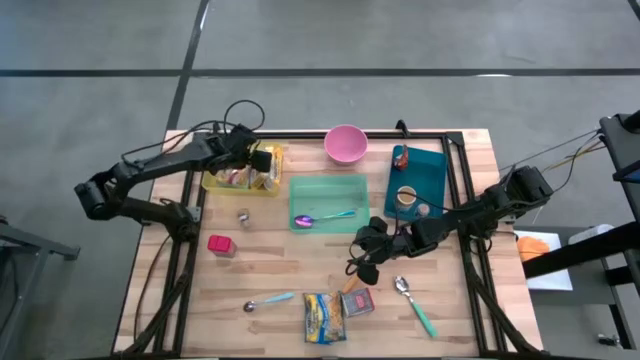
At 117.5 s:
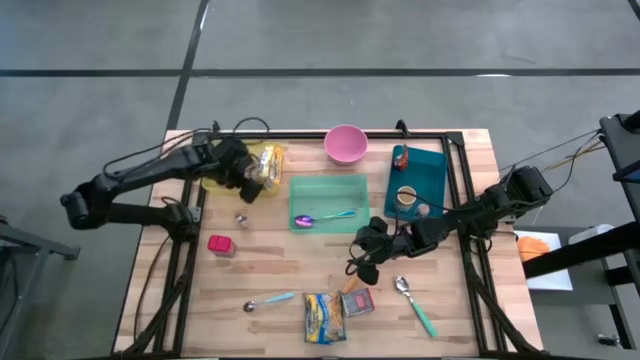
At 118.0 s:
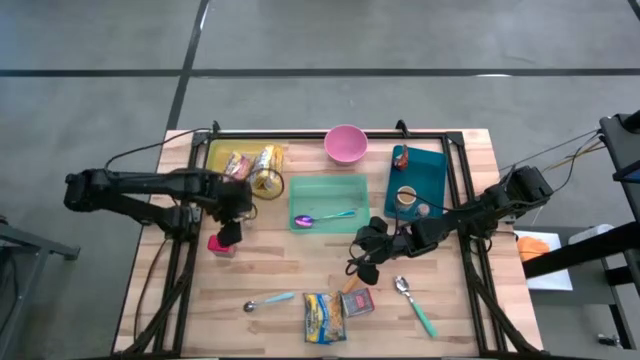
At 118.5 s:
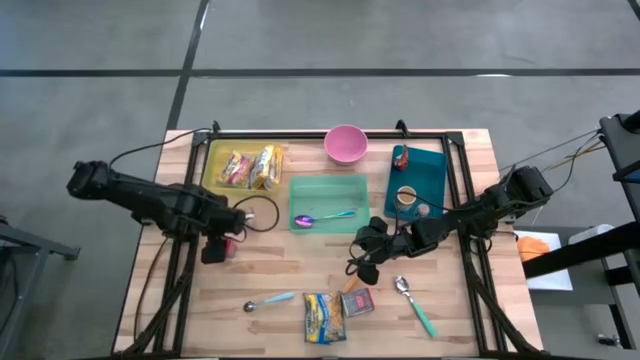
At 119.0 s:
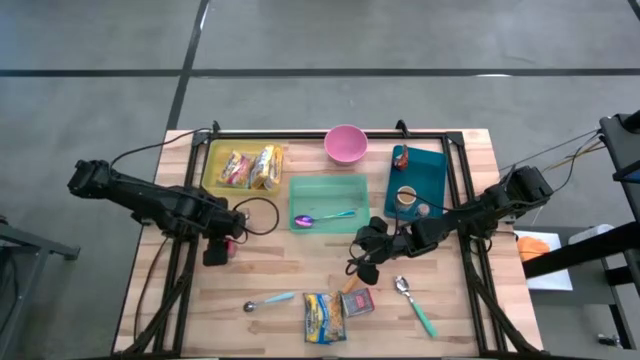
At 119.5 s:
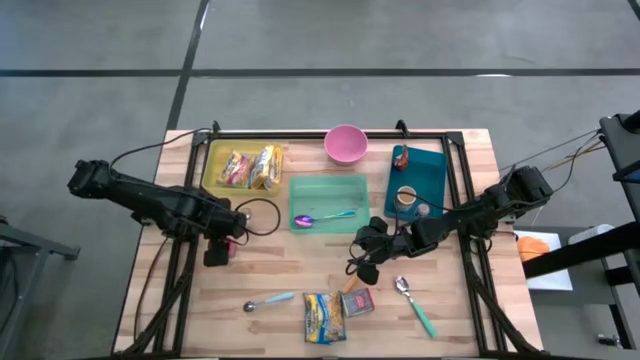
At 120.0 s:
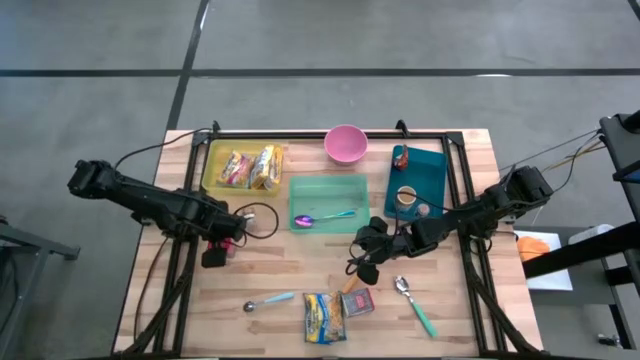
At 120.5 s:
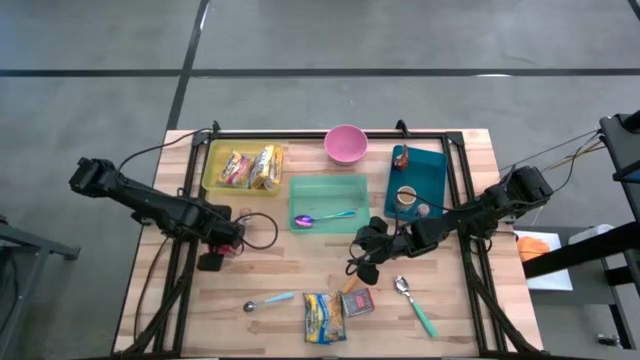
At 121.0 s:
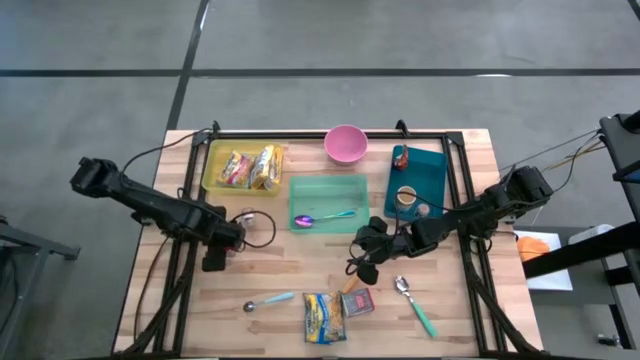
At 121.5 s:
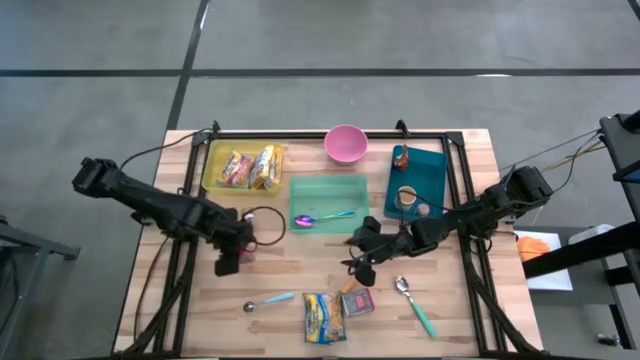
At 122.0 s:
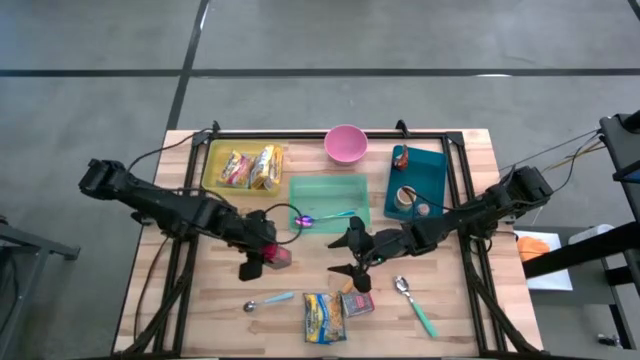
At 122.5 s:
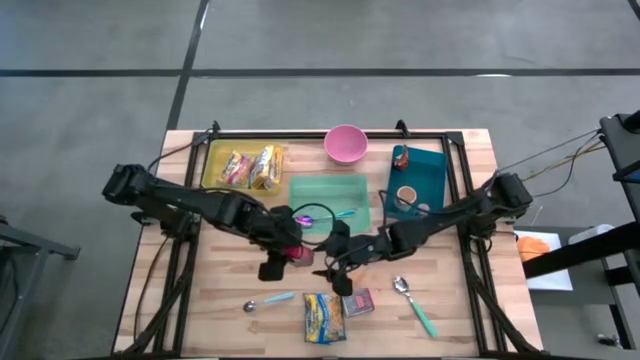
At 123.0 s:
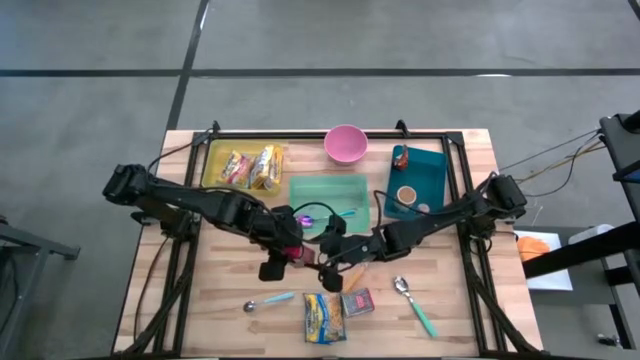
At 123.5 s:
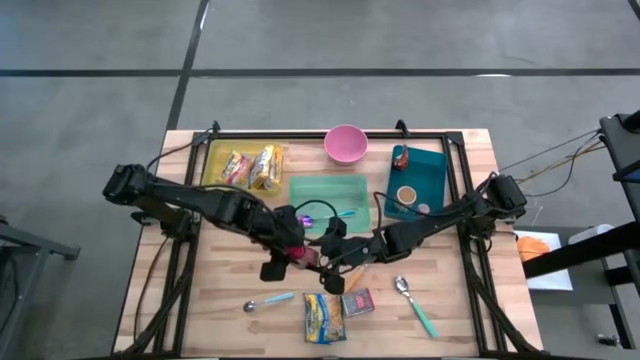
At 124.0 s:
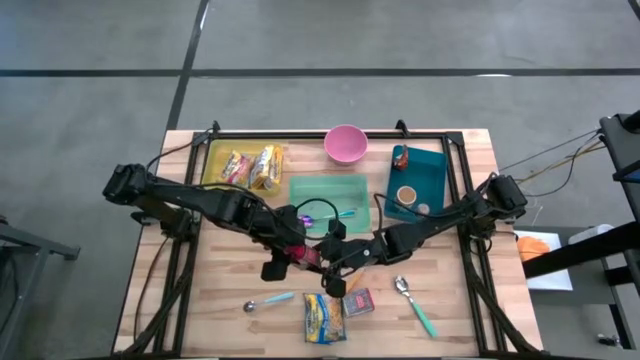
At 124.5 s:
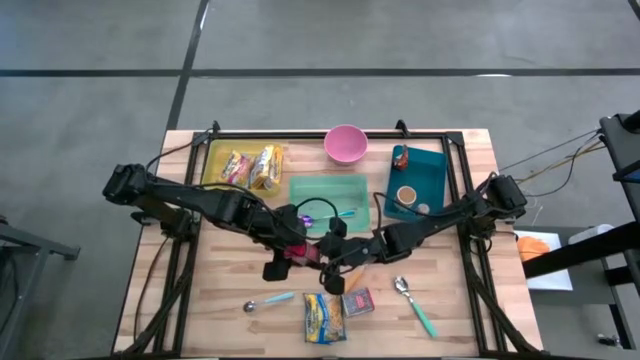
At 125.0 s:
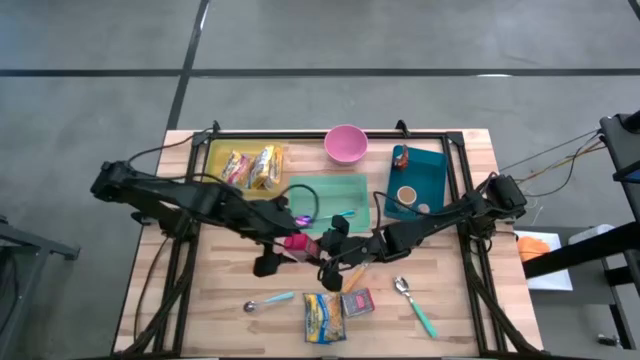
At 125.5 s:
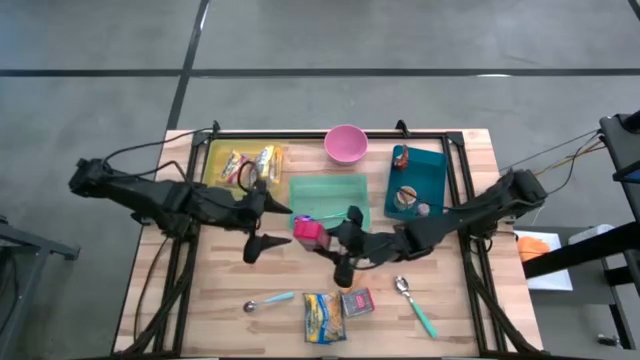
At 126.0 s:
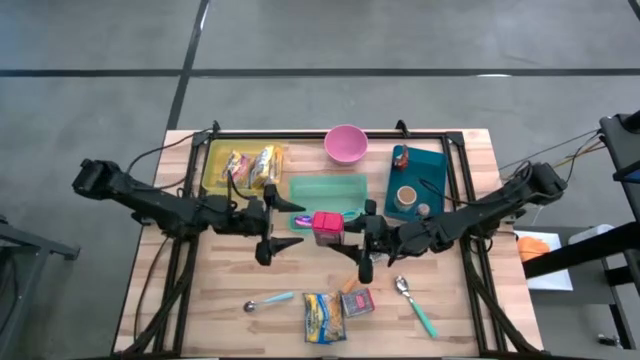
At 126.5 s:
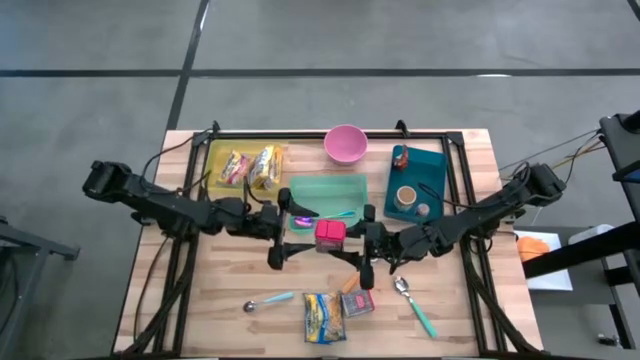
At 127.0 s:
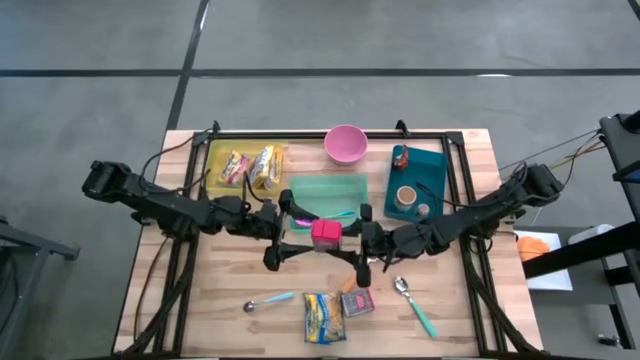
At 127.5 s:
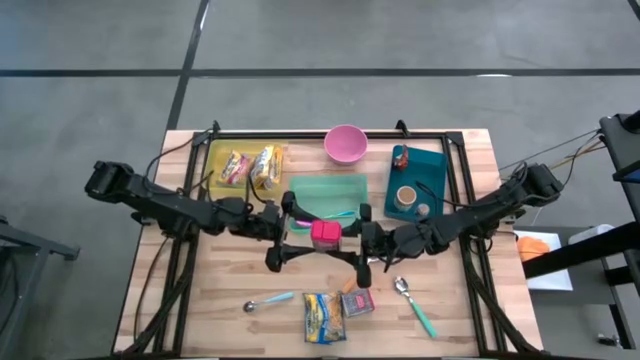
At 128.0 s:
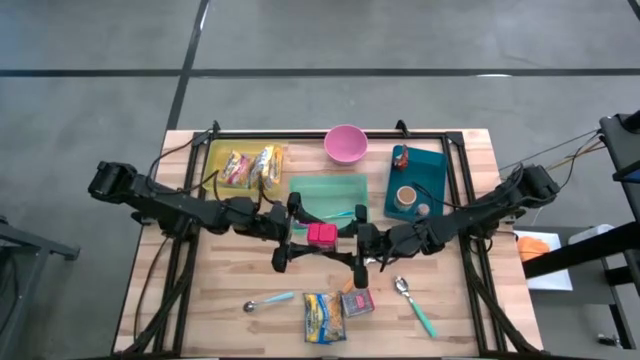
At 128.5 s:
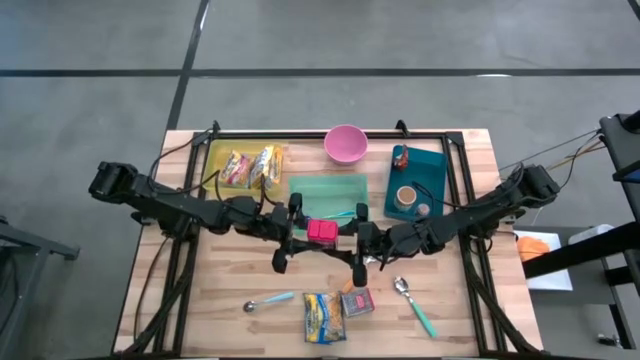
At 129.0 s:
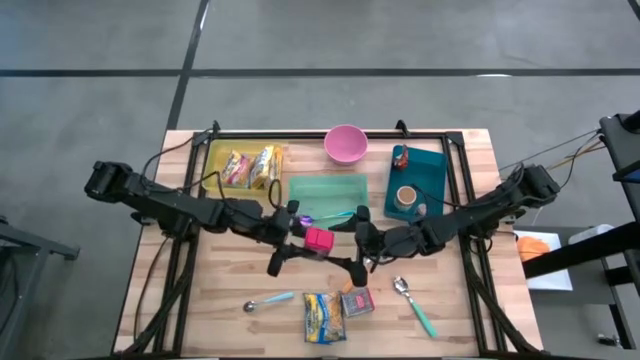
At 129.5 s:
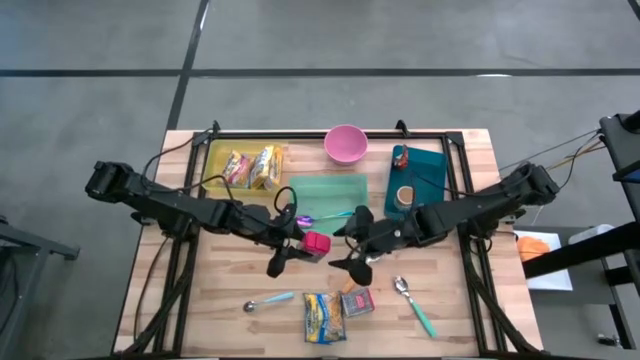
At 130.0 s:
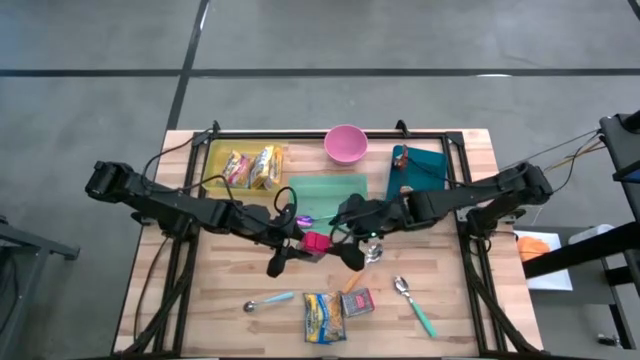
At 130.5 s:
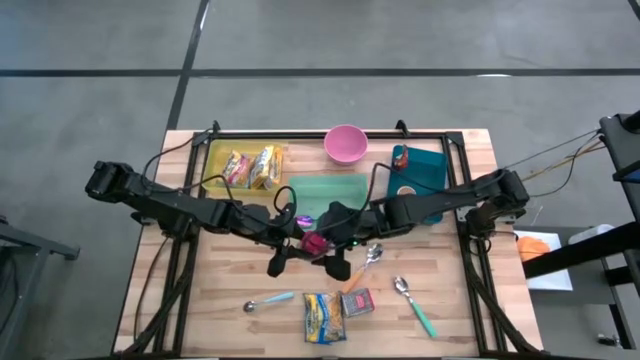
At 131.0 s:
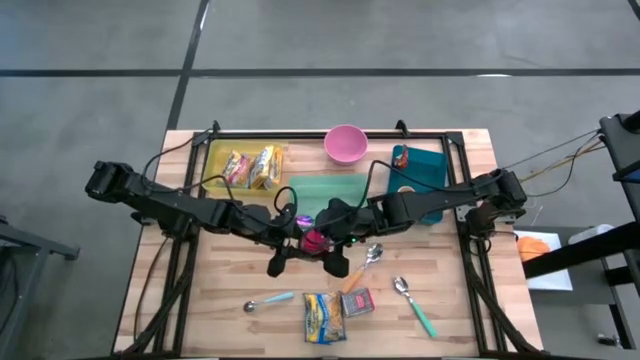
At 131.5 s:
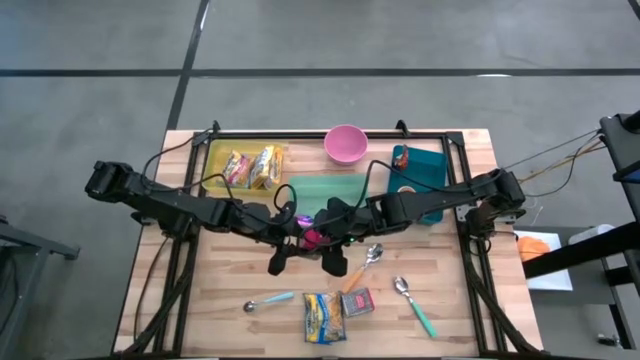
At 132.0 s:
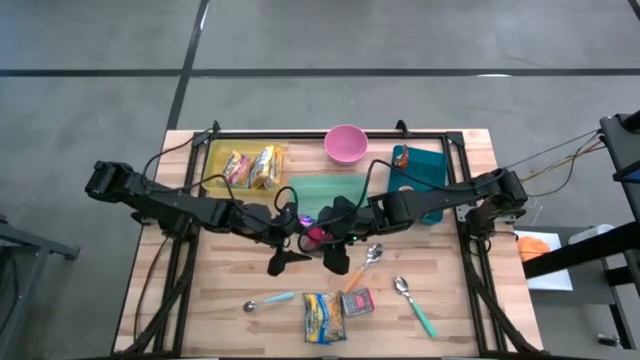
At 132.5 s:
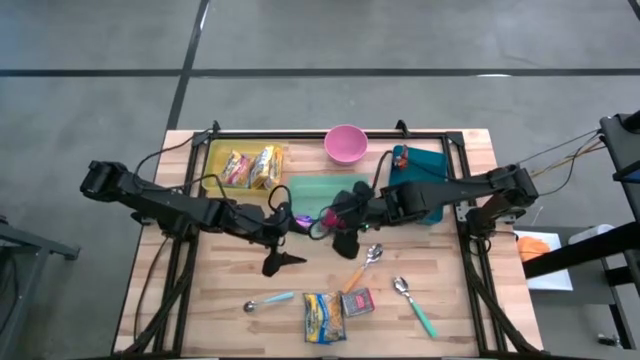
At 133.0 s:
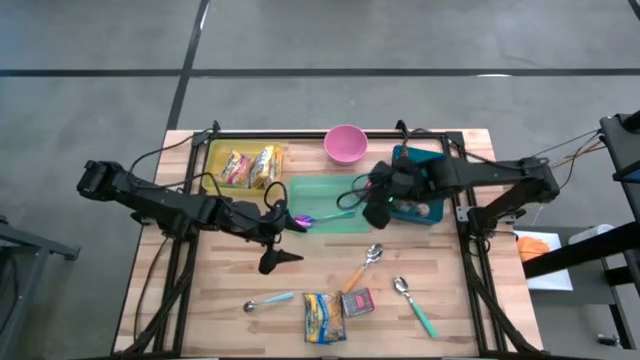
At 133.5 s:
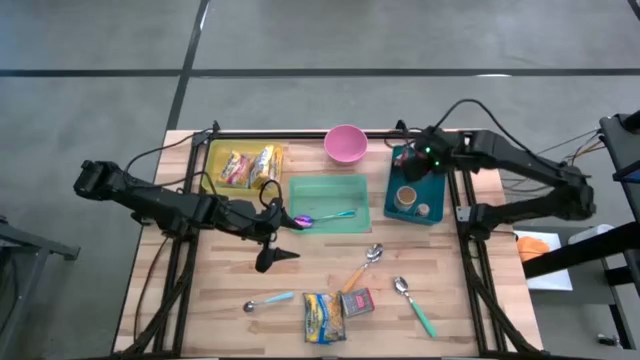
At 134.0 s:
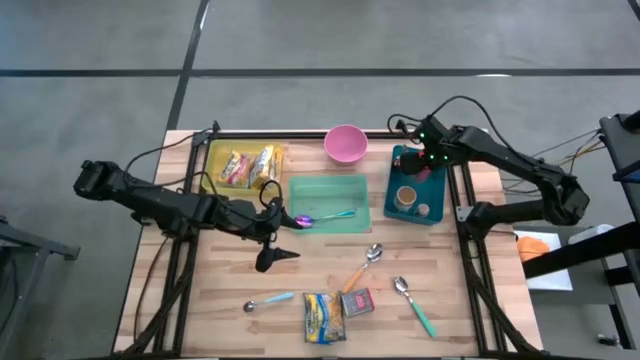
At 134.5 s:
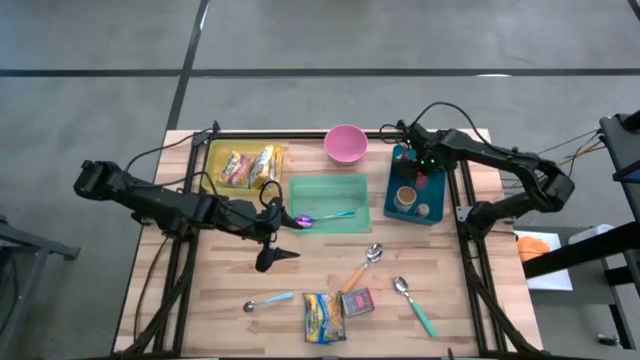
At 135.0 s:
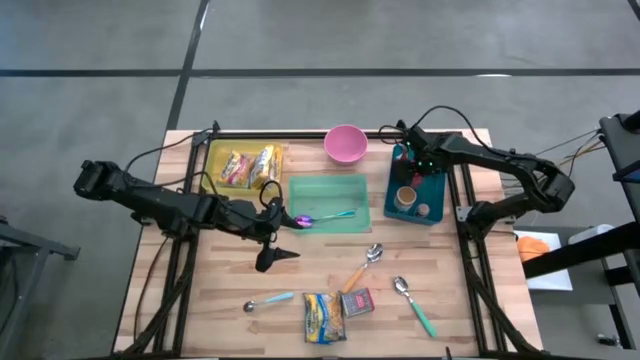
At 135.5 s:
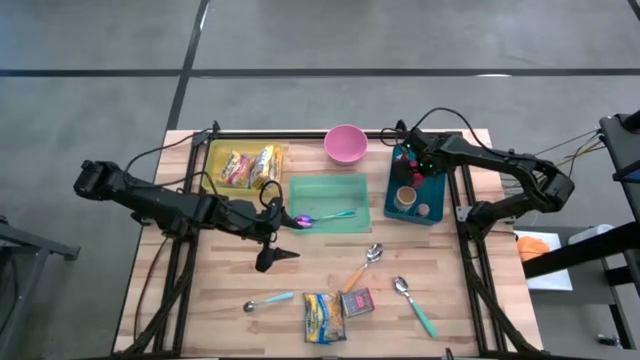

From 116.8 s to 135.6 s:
Put the left red seasoning can into the blue bin
